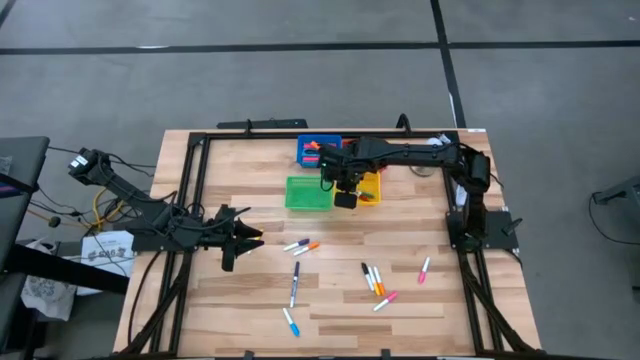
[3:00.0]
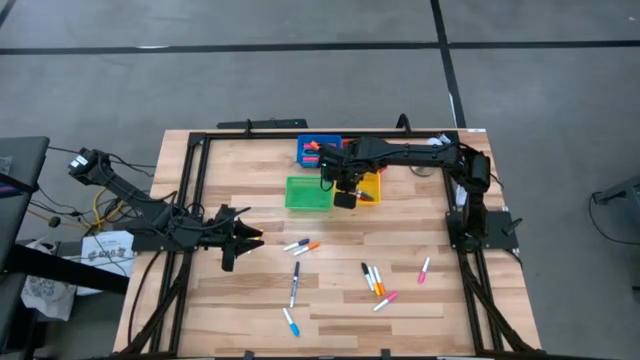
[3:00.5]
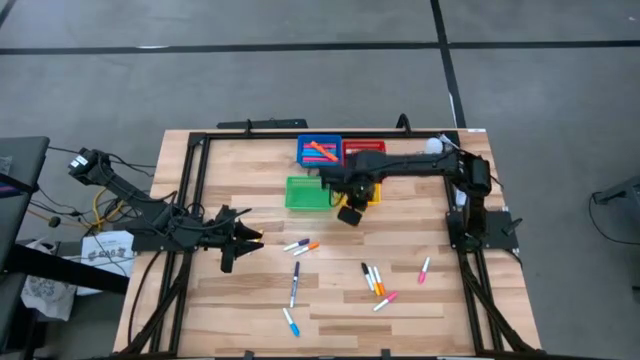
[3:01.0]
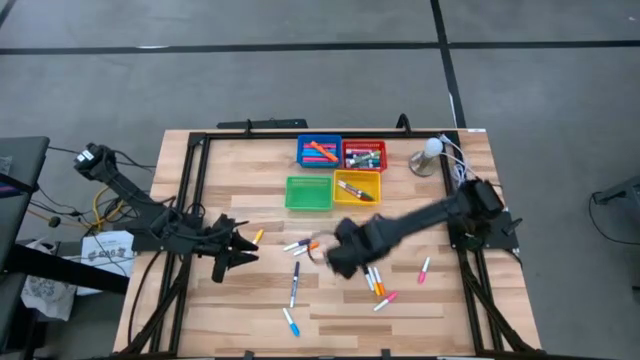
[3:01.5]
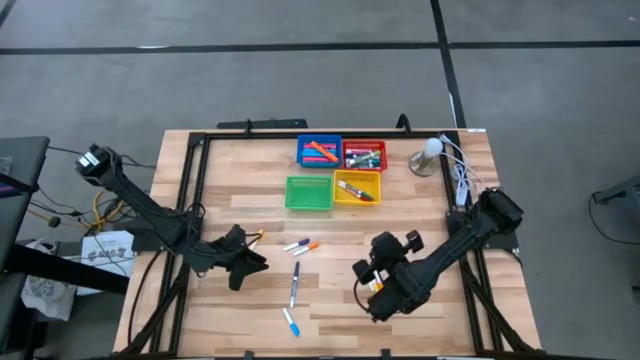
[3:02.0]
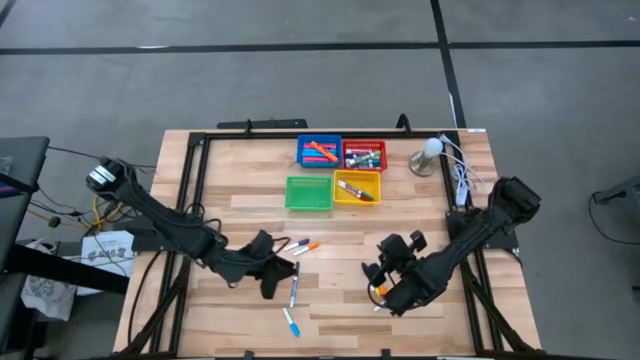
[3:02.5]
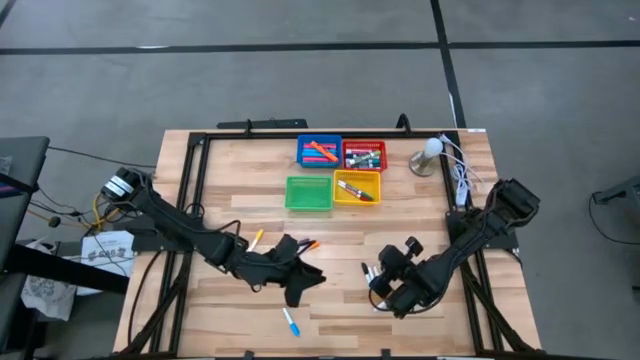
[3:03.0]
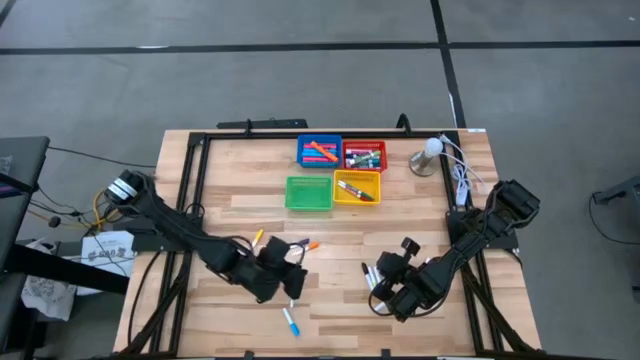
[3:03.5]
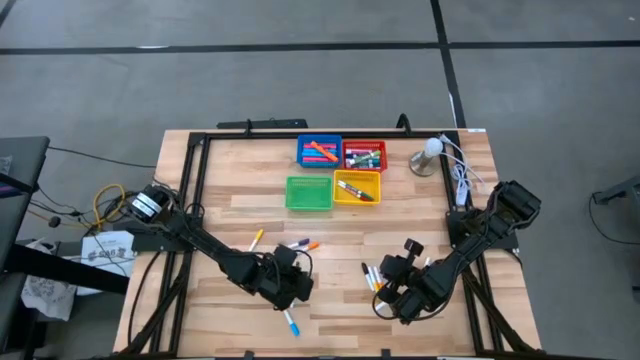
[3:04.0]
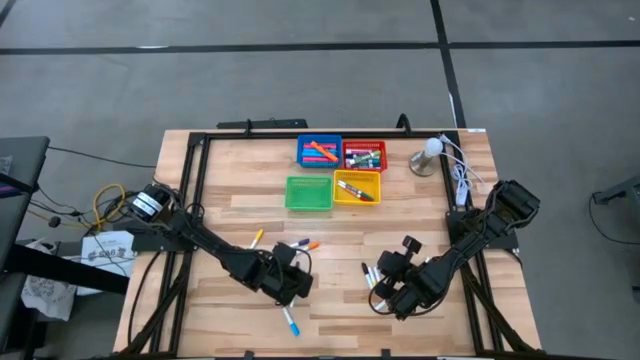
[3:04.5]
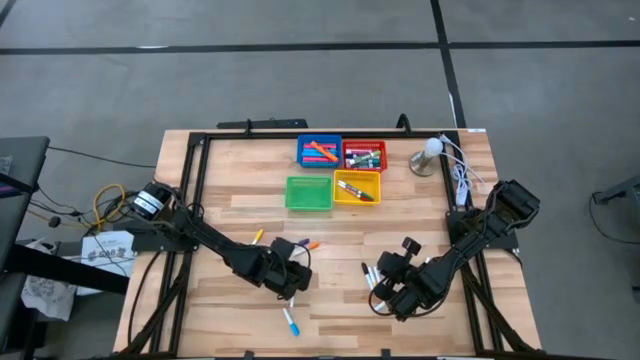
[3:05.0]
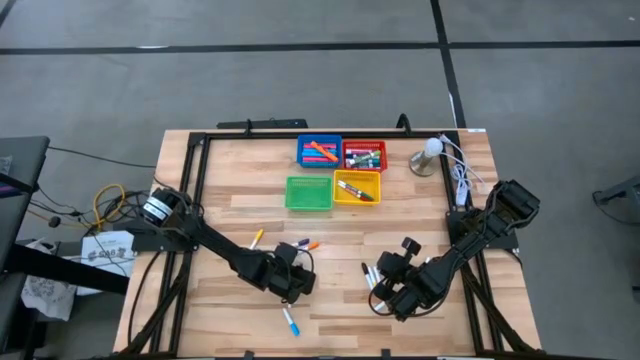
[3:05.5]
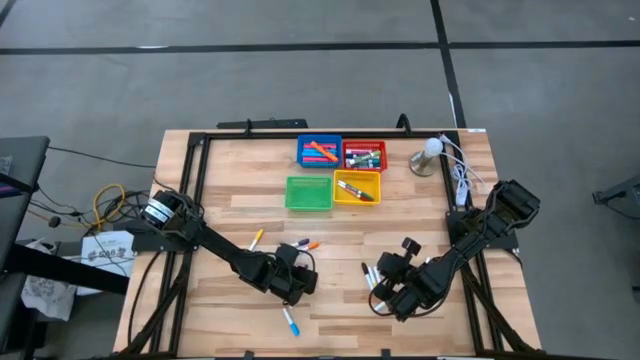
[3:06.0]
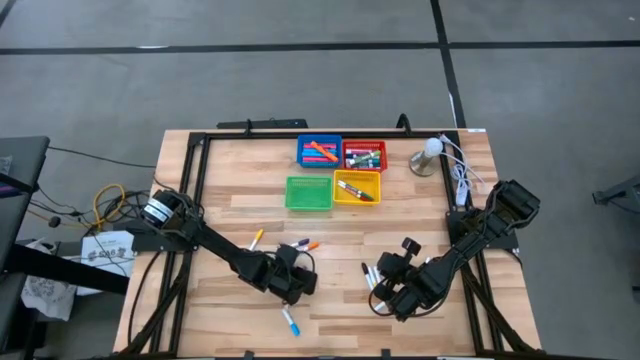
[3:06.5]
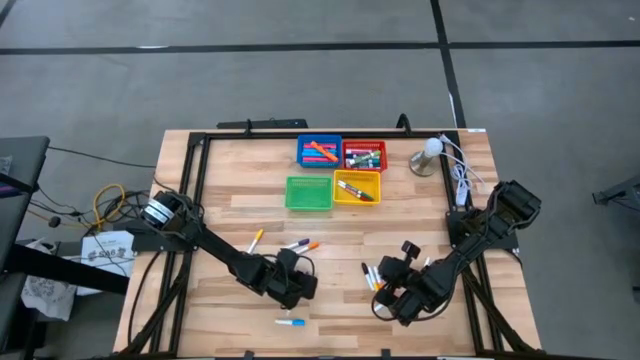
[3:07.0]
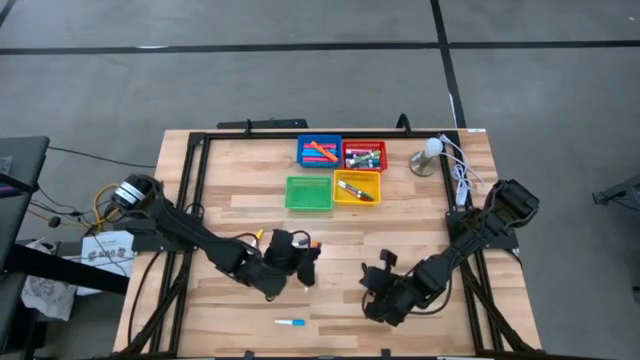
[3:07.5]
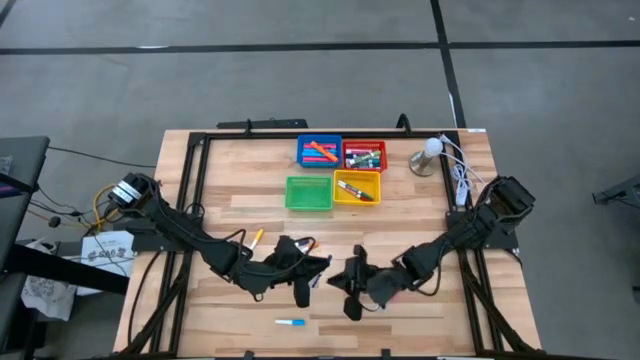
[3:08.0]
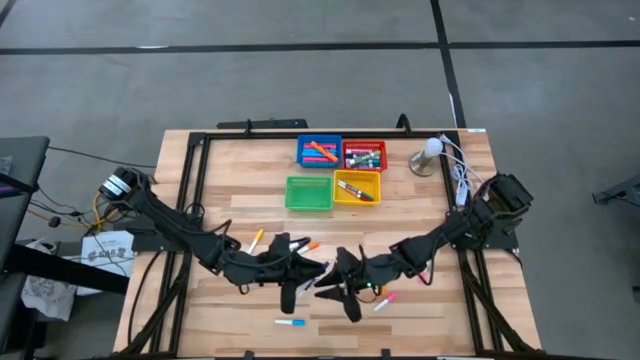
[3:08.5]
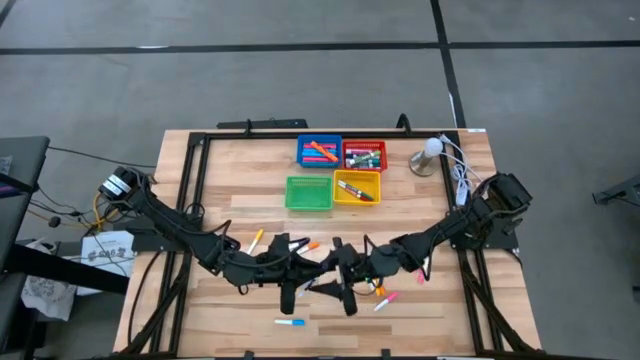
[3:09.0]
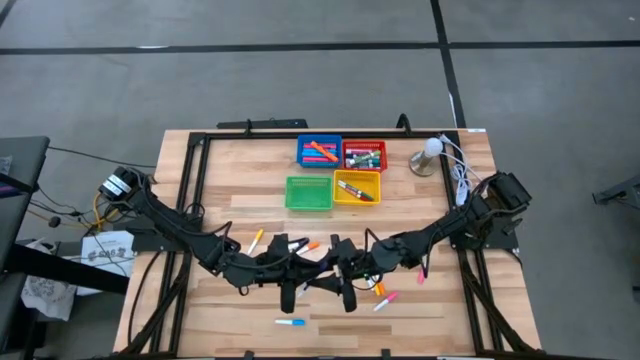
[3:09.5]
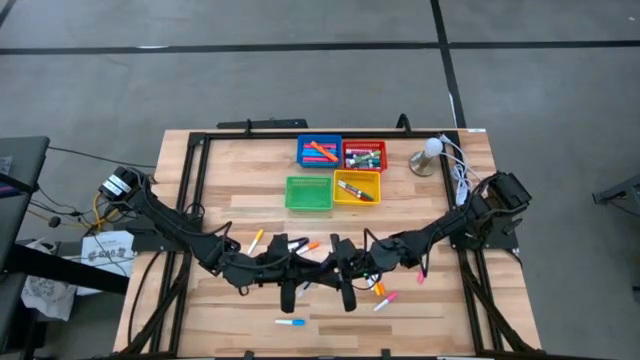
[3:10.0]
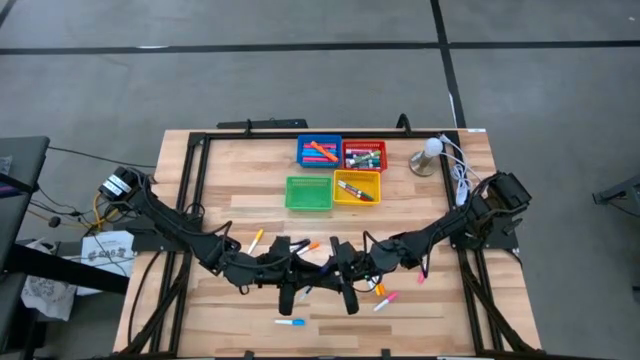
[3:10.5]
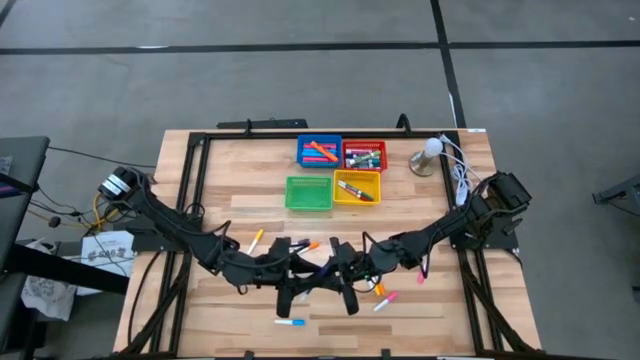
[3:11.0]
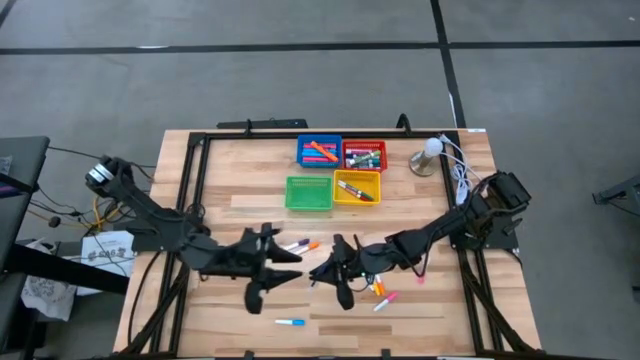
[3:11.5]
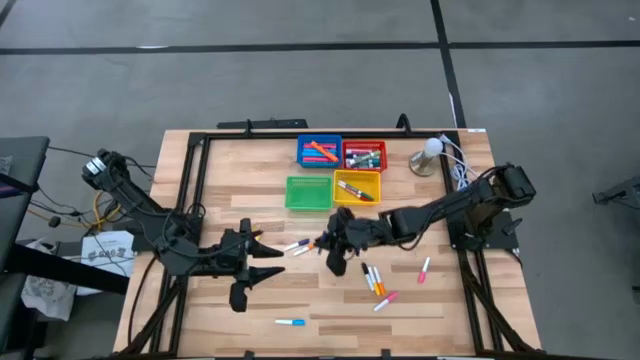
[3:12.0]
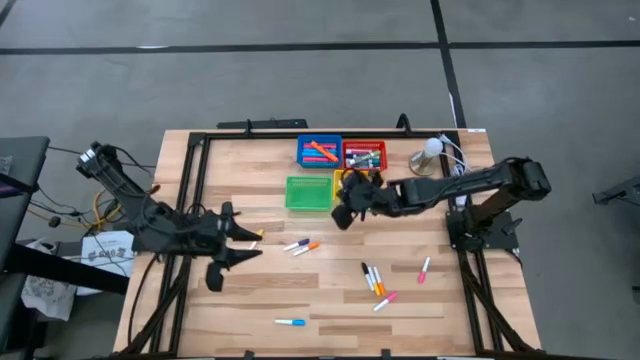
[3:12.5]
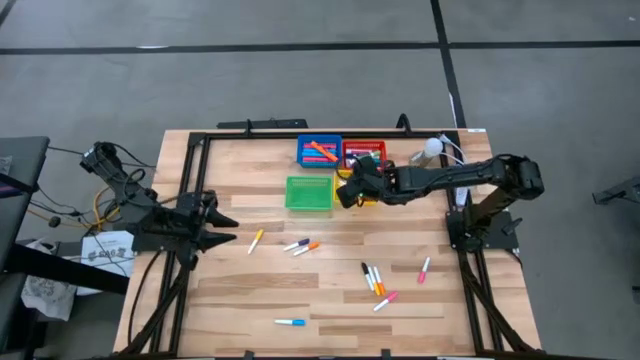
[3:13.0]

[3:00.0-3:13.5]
Task: Pick & Place Markers
Put the blue thin dry erase marker into the yellow bin

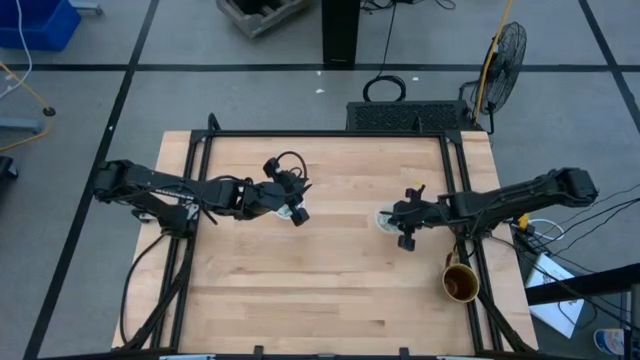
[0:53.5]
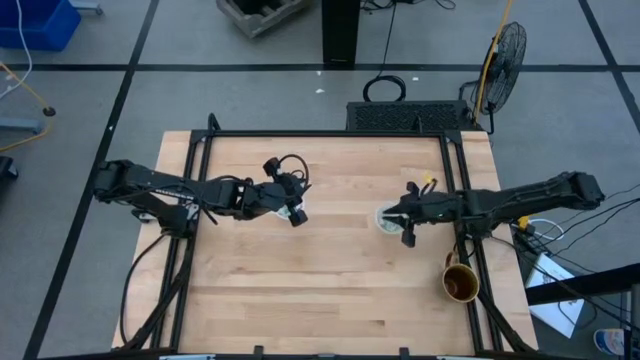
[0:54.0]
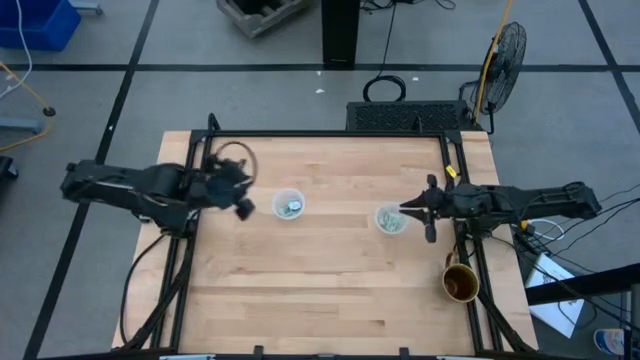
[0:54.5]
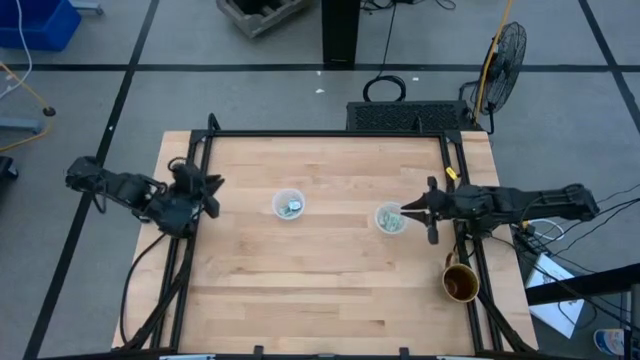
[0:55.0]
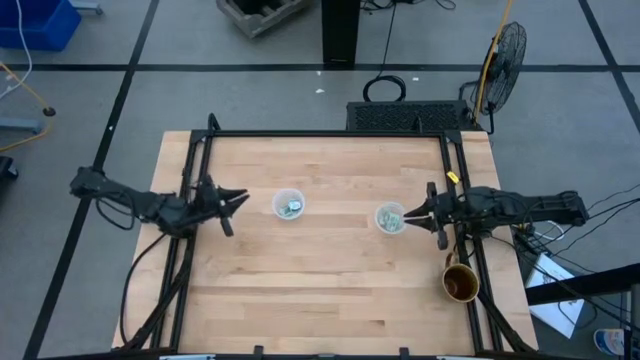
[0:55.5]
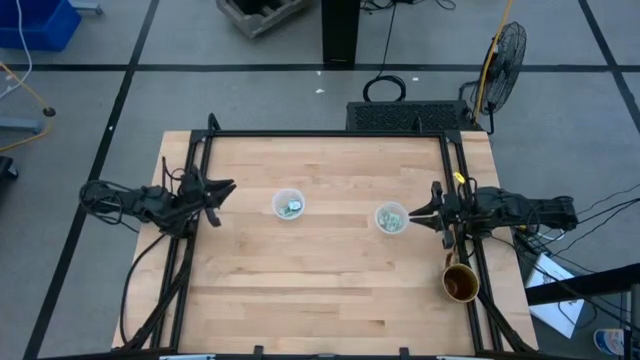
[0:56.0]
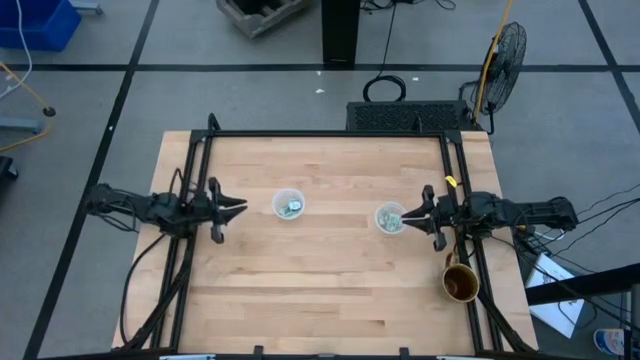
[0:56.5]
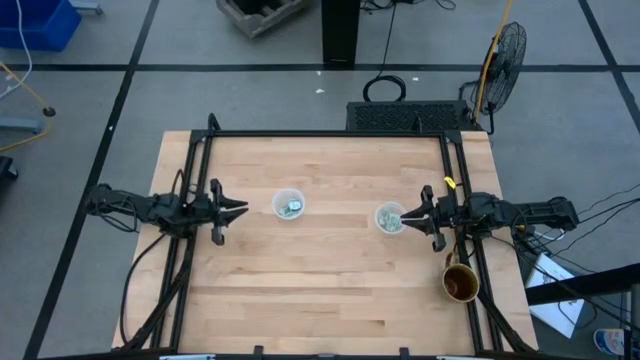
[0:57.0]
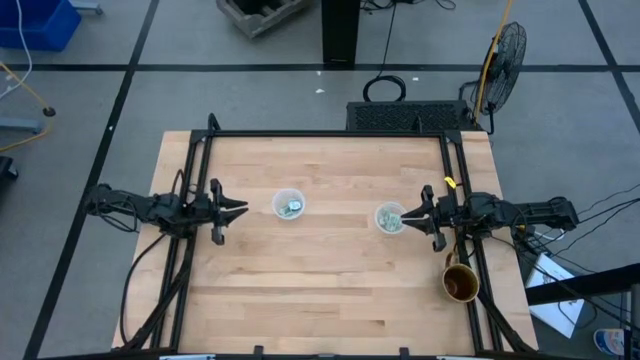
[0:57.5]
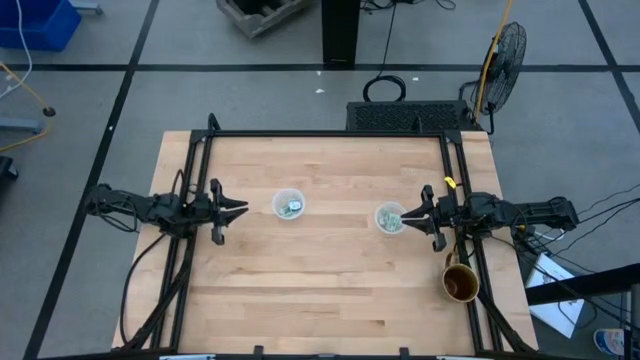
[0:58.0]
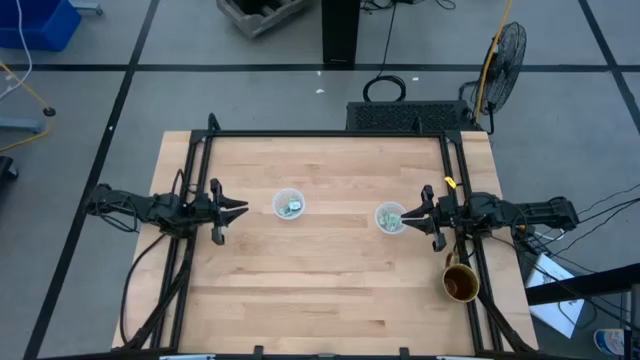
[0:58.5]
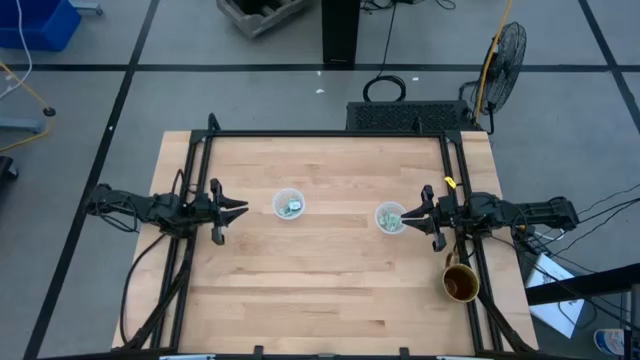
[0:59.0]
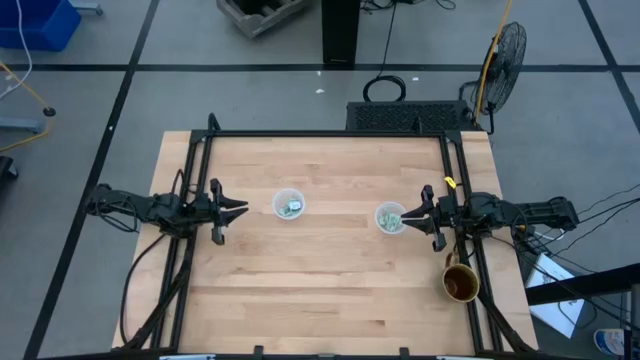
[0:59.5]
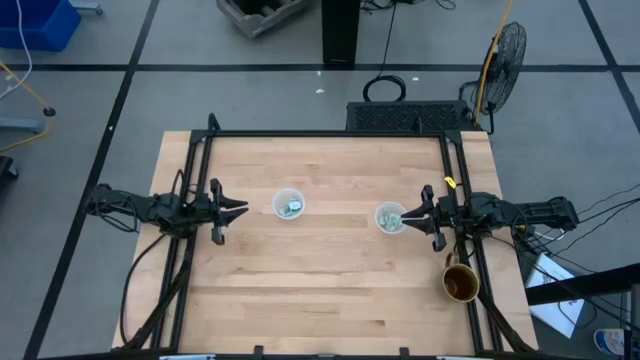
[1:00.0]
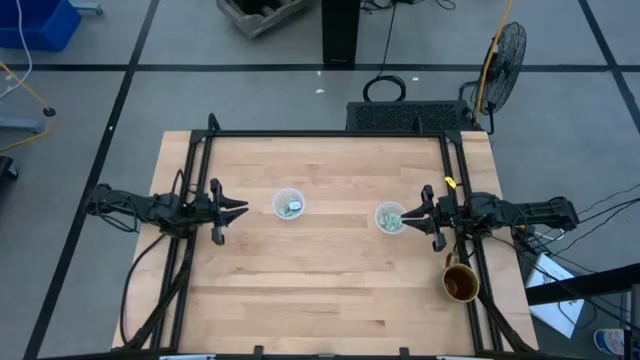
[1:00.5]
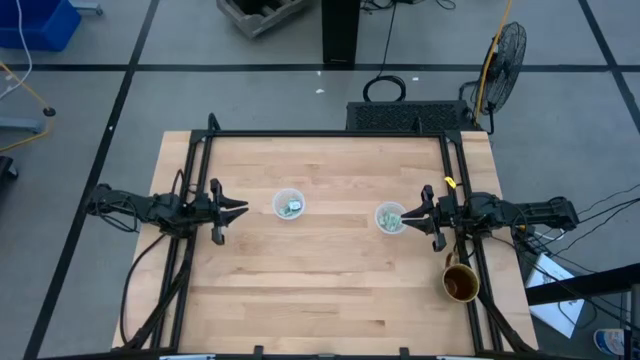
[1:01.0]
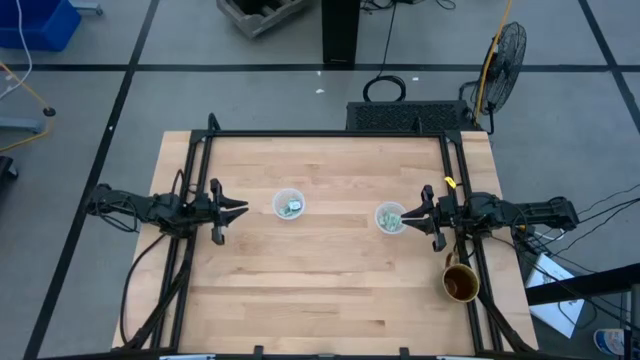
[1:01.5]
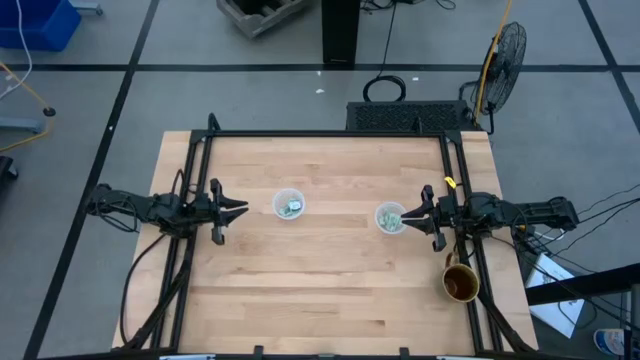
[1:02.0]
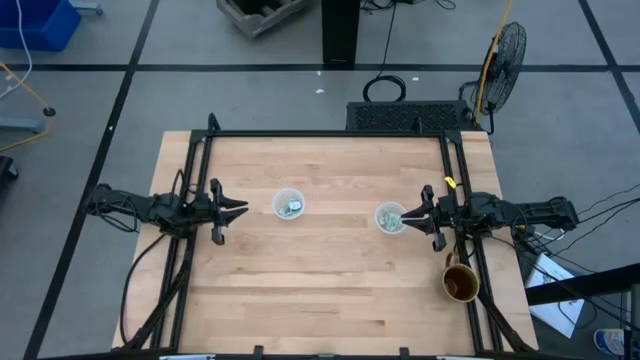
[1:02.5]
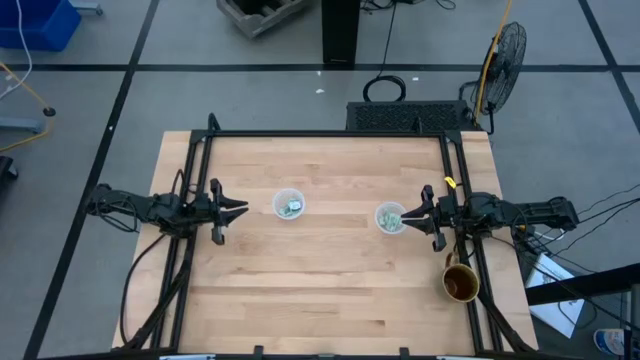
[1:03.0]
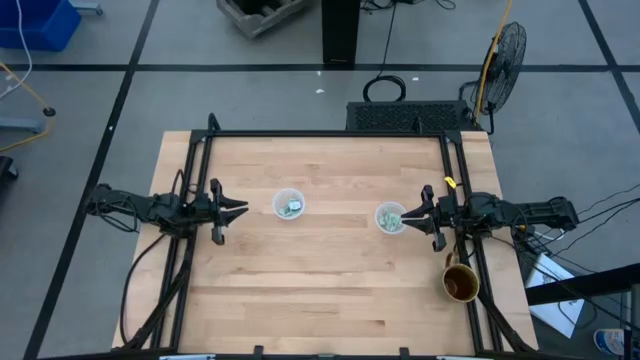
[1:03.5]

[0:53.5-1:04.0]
Task: Pick and place Stevia / Truvia into bins
Return to Home Position
